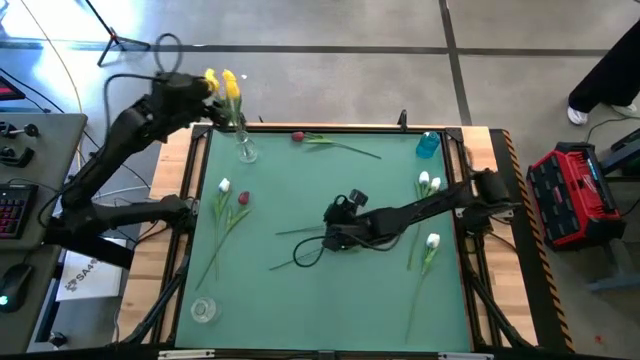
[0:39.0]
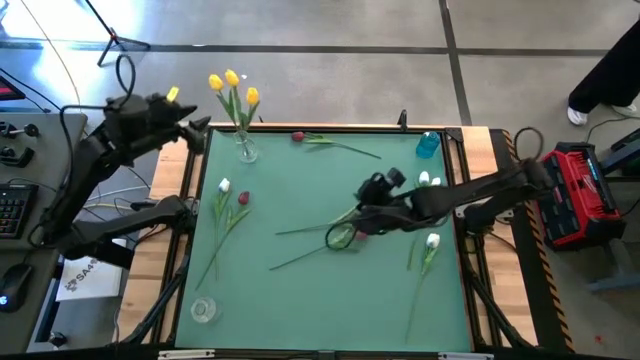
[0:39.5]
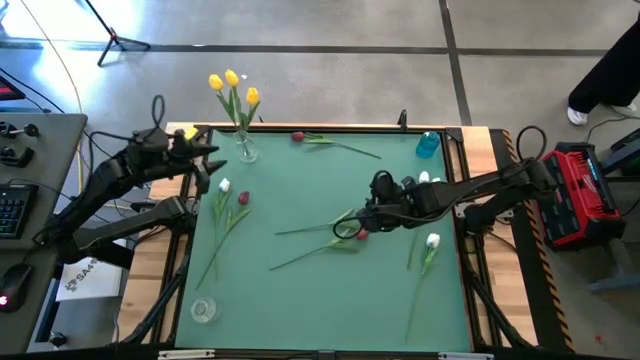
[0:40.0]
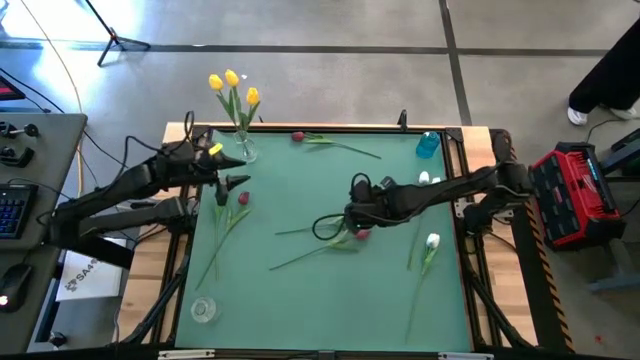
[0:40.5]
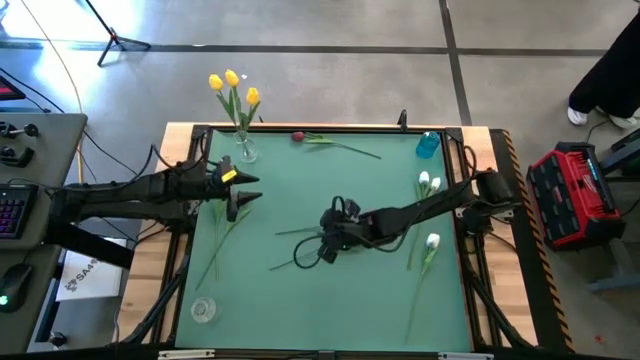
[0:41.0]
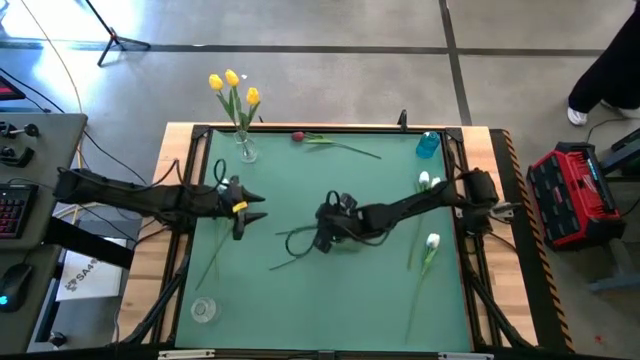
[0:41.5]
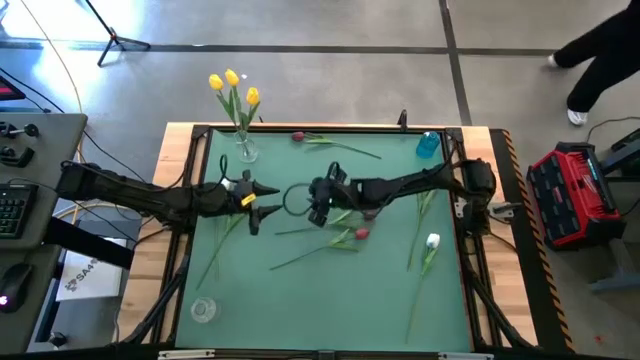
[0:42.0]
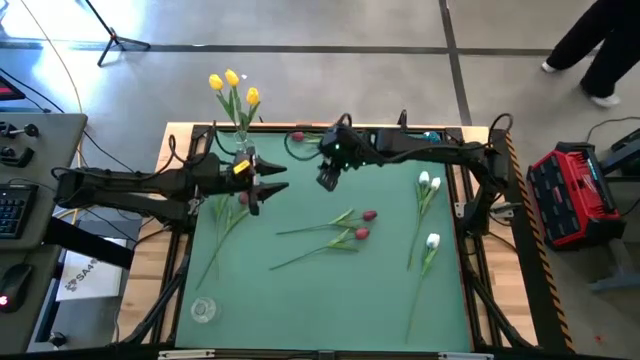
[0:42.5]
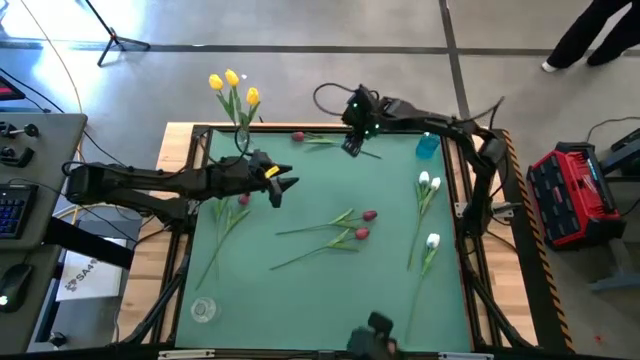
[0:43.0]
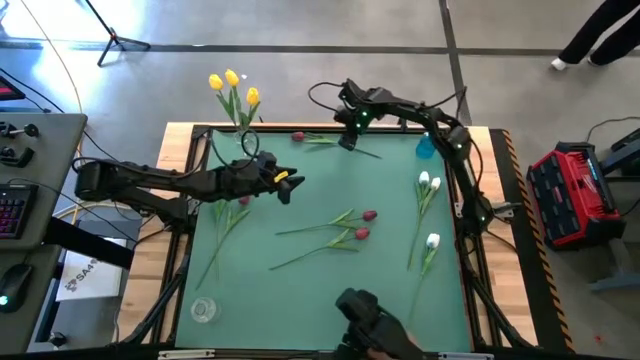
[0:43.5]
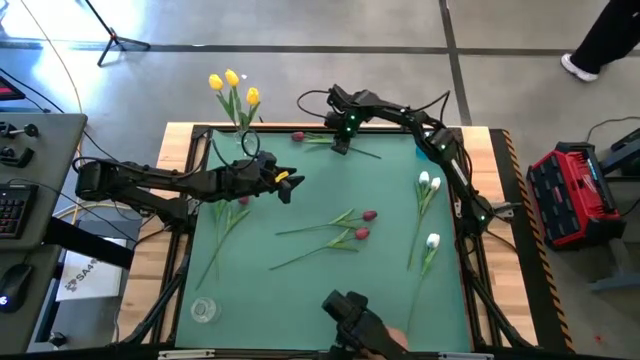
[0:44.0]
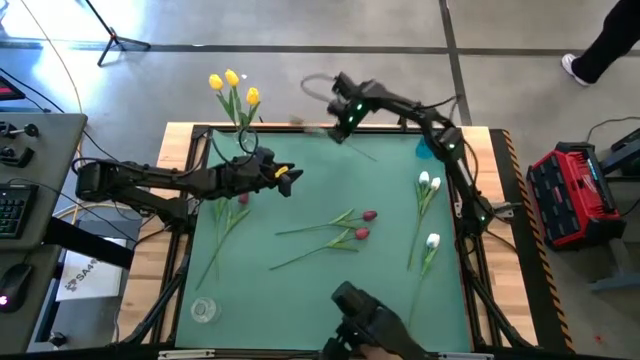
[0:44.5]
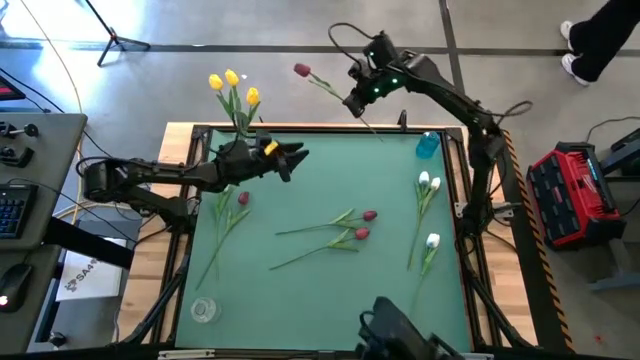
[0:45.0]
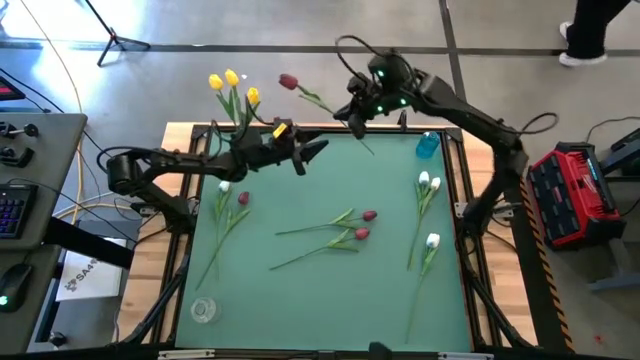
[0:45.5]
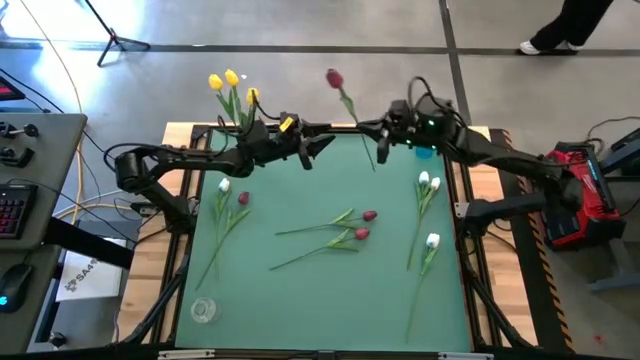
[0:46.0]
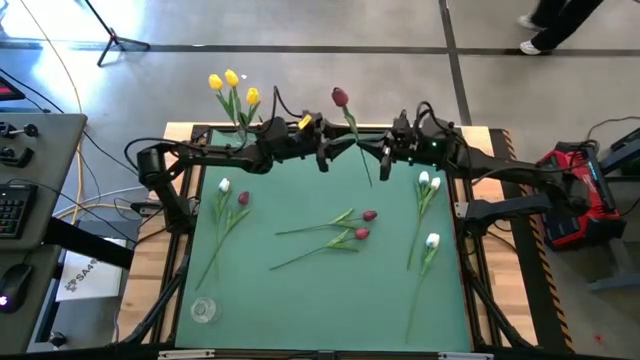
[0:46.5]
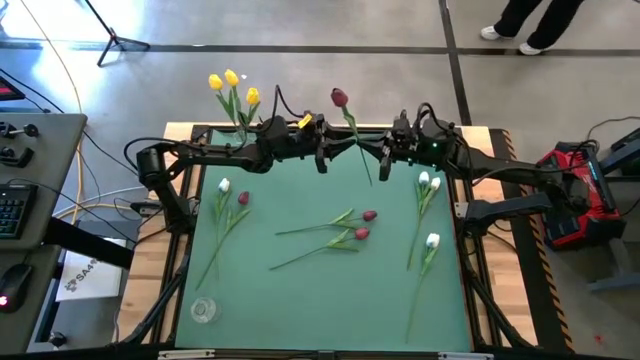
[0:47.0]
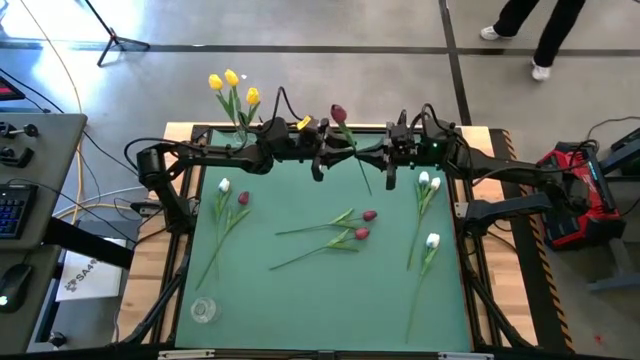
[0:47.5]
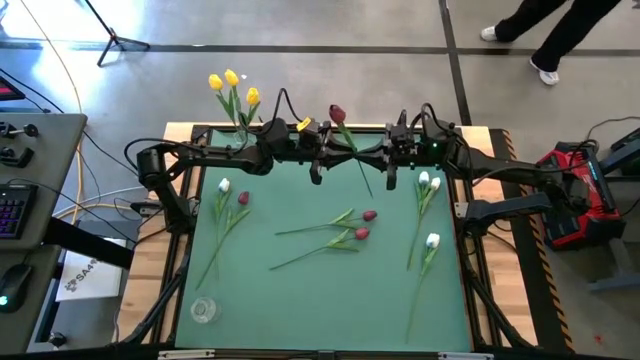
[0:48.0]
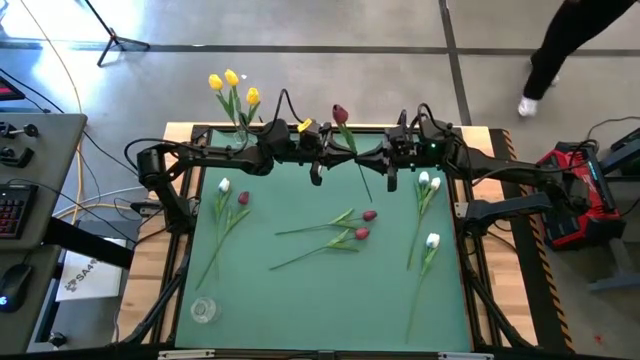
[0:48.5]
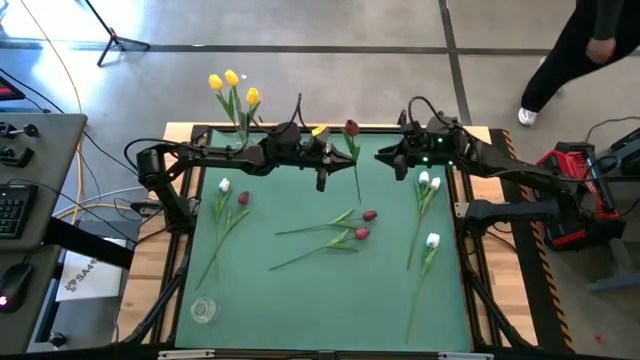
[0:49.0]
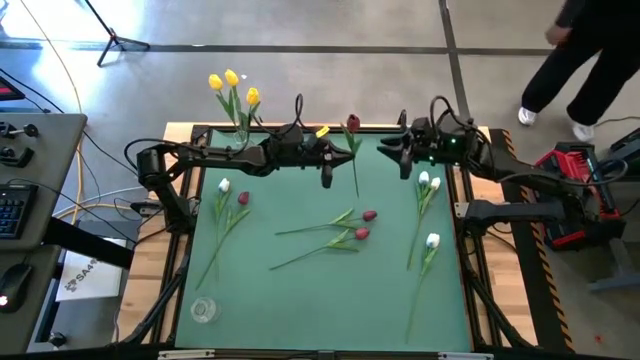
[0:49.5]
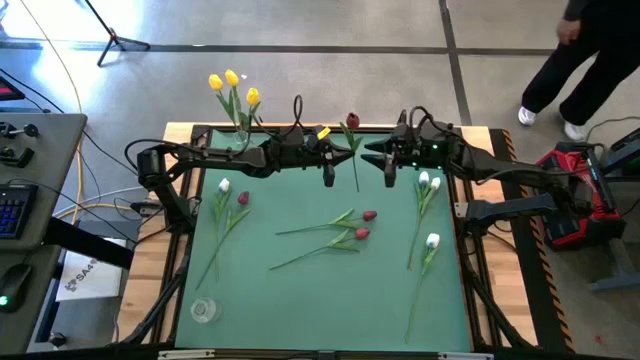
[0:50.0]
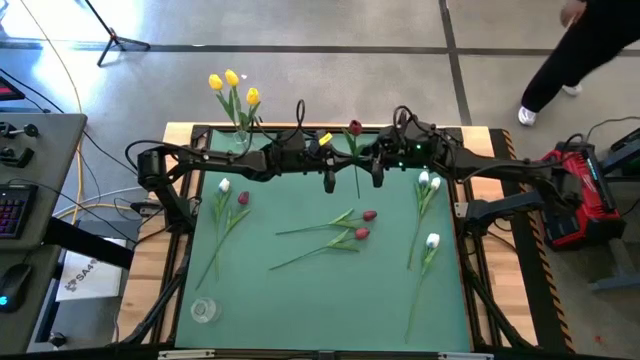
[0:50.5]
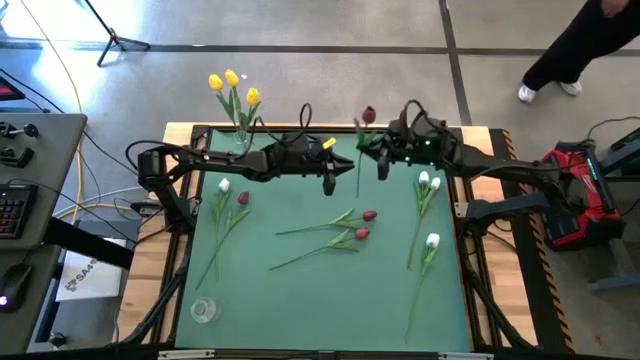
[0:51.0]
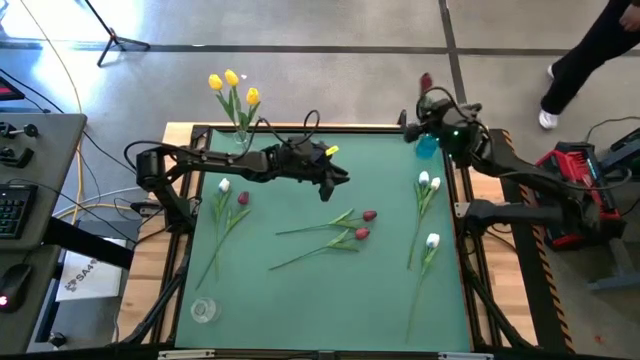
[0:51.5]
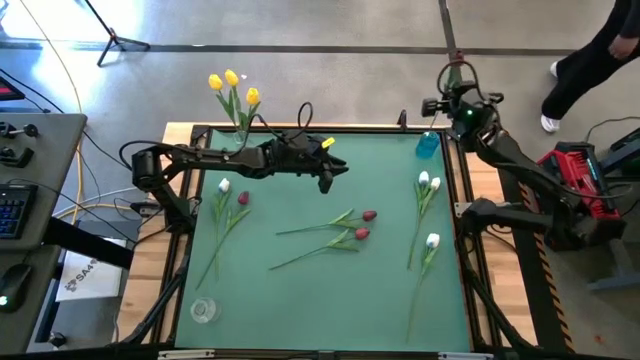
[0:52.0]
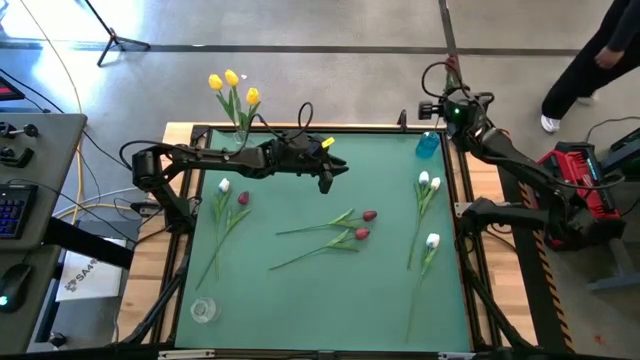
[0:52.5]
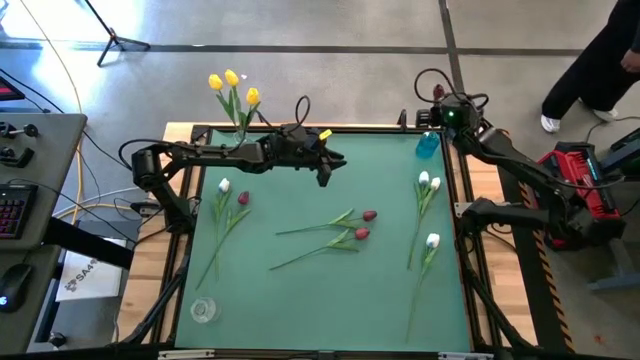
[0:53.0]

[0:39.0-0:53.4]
Task: Sort flowers into vase by color
Put the top right red tulip into the blue vase

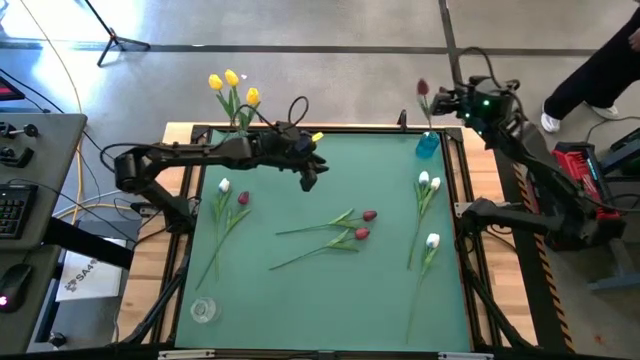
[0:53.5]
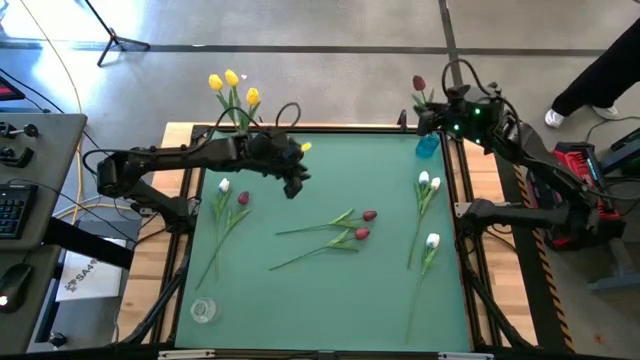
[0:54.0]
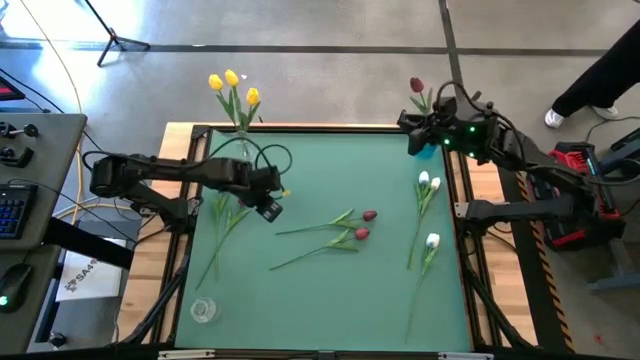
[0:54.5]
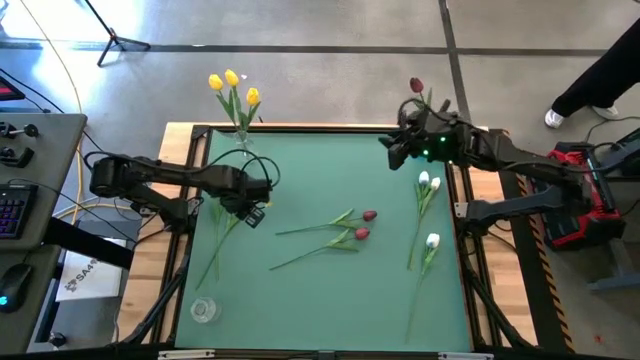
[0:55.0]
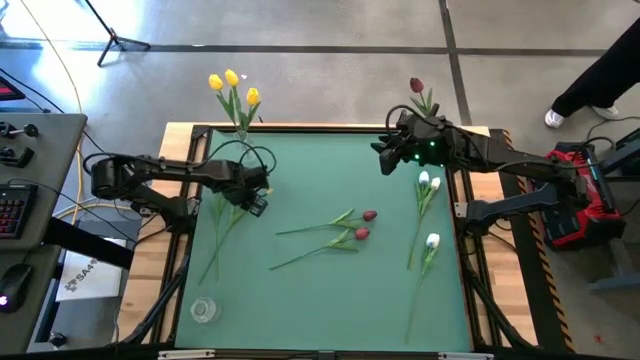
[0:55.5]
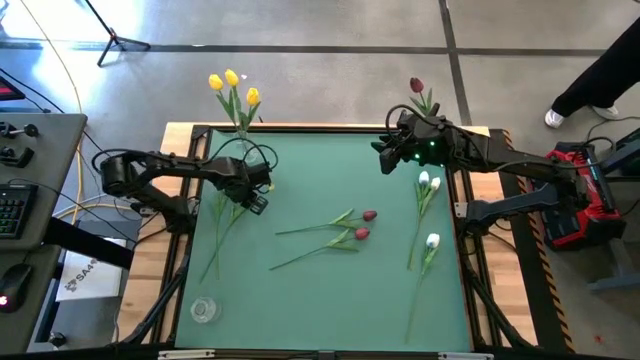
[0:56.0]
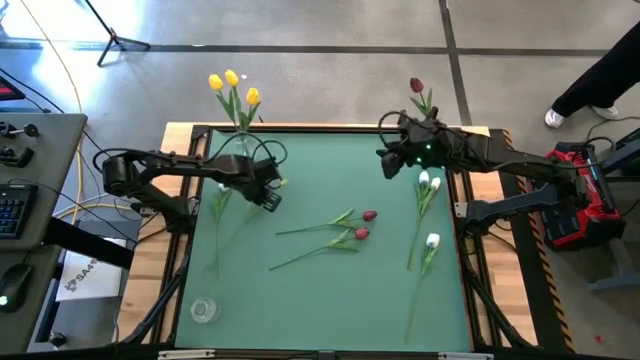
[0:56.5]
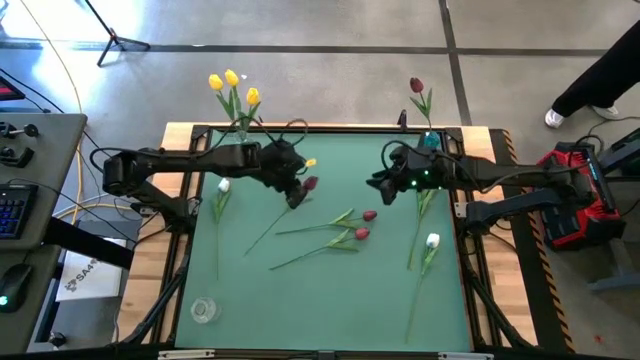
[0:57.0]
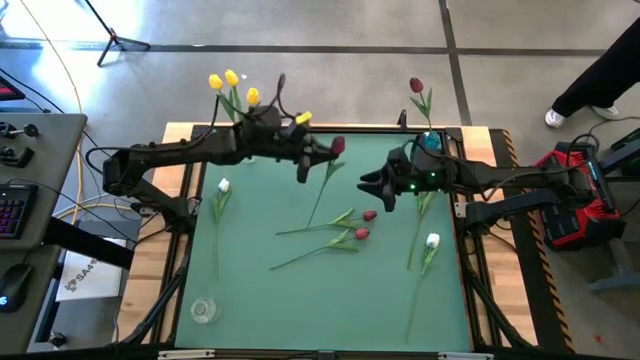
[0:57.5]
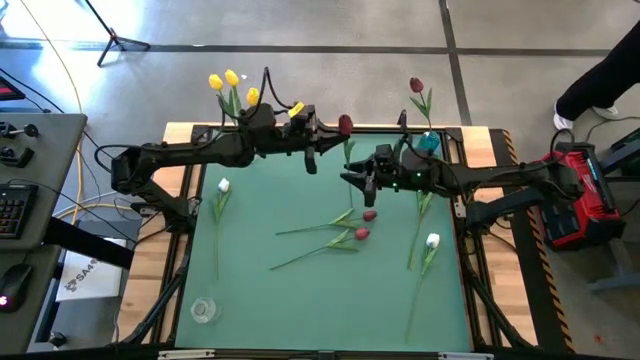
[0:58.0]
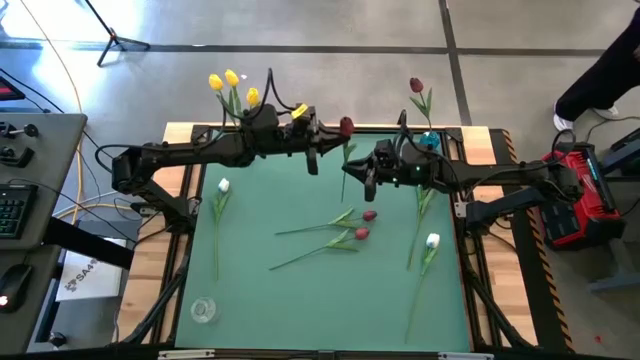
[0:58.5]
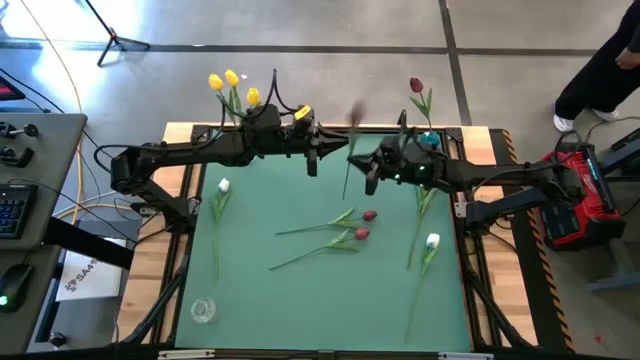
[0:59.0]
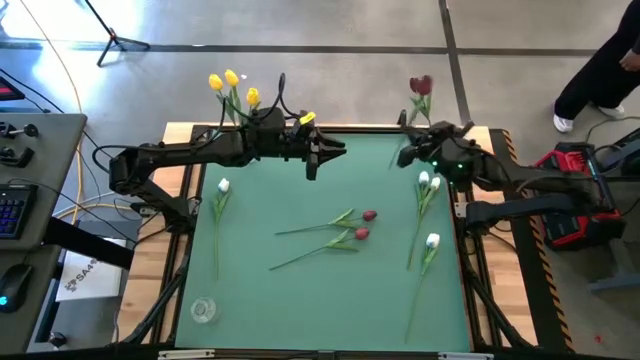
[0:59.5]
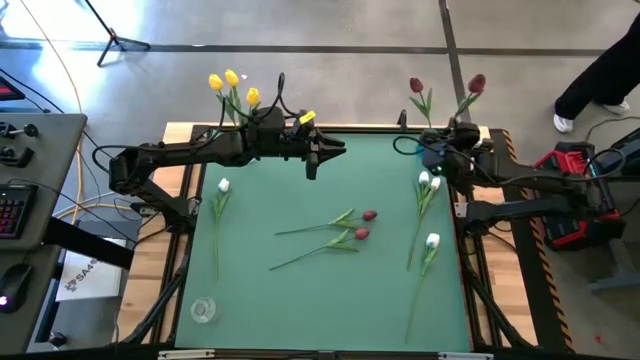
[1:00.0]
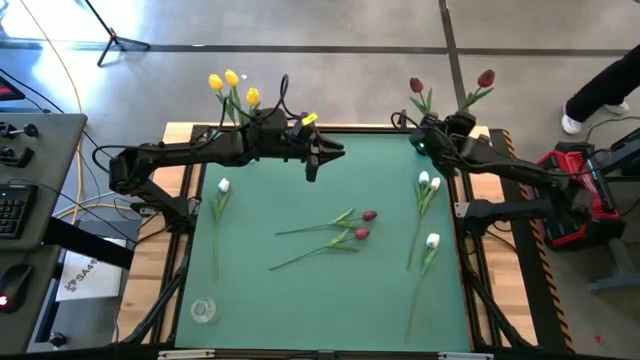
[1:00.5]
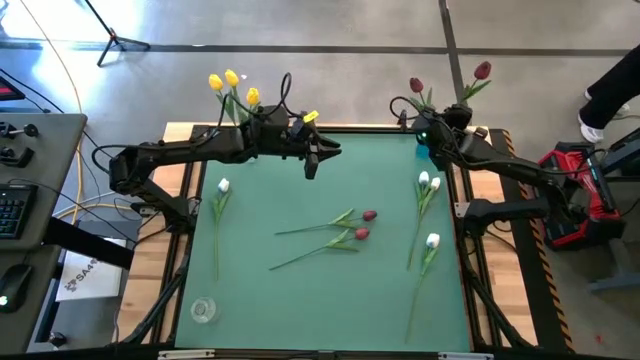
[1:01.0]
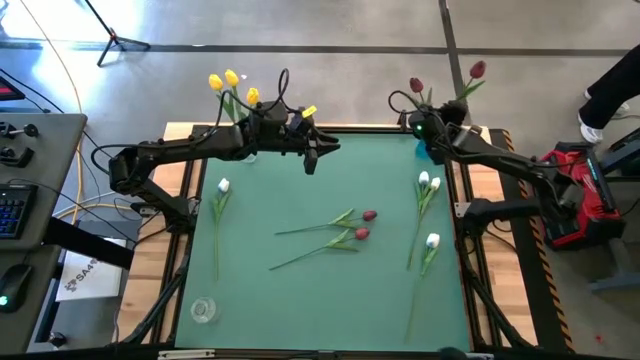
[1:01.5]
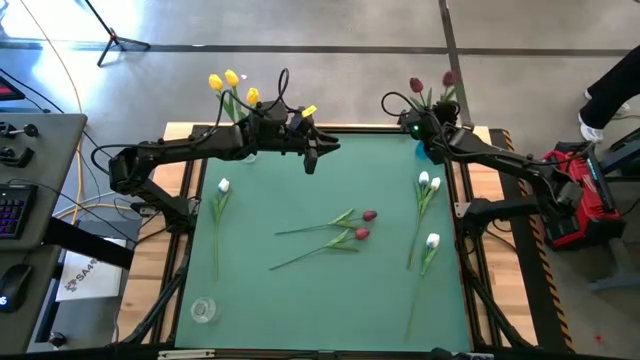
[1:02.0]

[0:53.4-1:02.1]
Put the left red tulip into the blue vase
